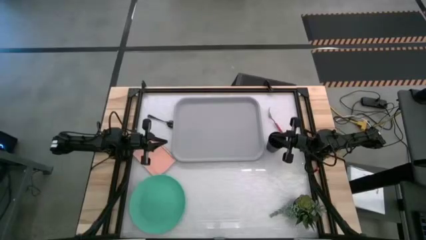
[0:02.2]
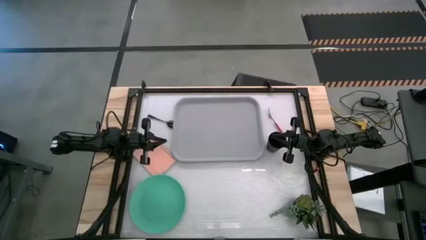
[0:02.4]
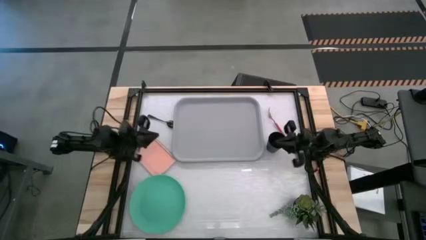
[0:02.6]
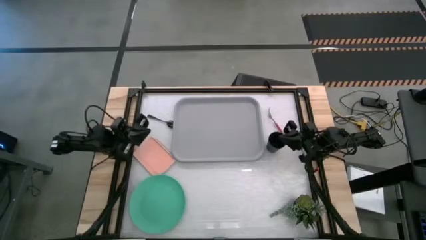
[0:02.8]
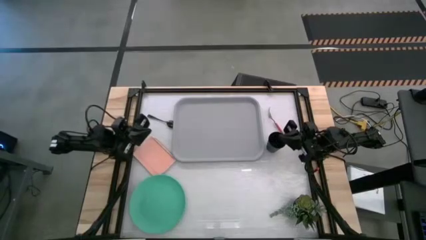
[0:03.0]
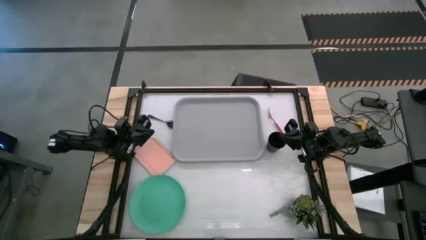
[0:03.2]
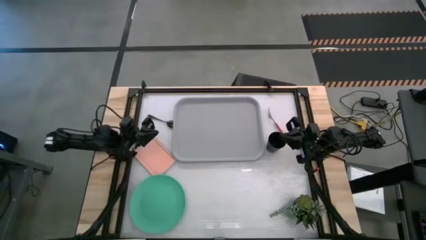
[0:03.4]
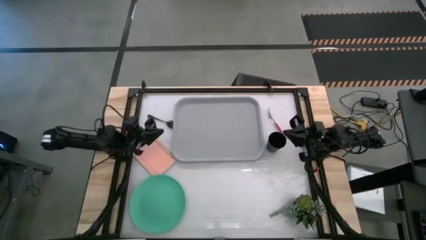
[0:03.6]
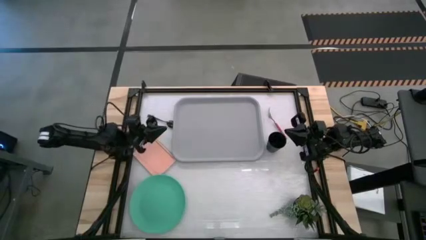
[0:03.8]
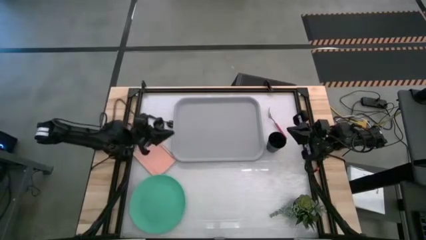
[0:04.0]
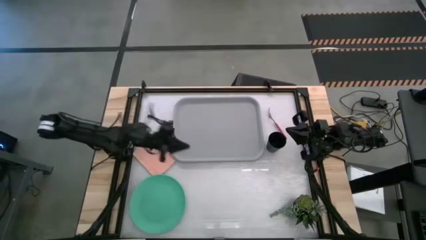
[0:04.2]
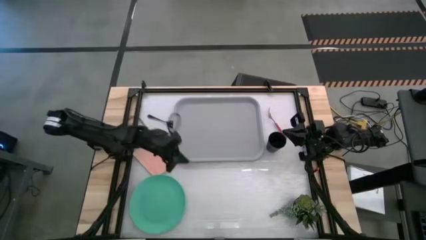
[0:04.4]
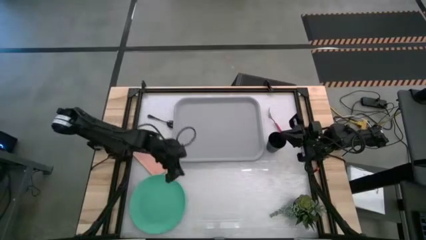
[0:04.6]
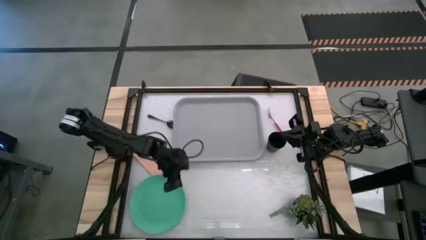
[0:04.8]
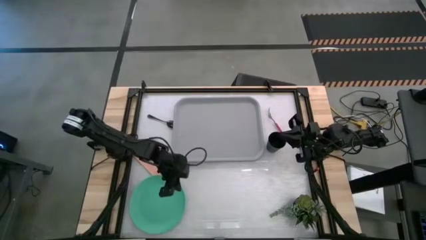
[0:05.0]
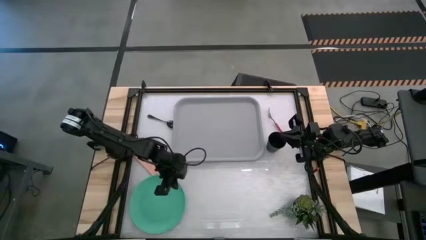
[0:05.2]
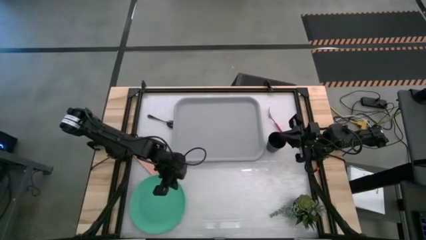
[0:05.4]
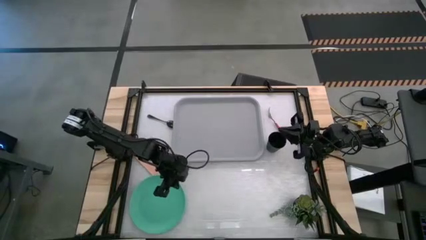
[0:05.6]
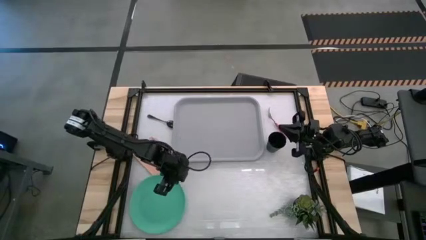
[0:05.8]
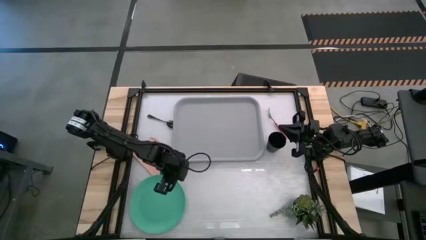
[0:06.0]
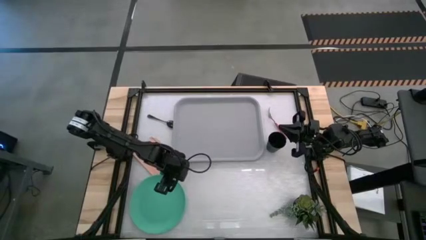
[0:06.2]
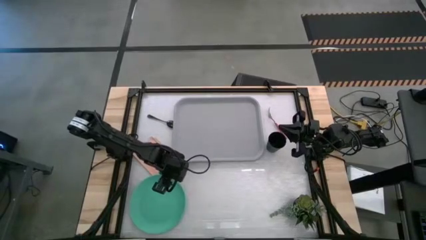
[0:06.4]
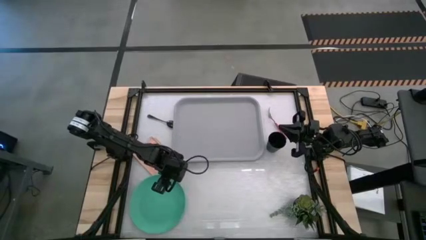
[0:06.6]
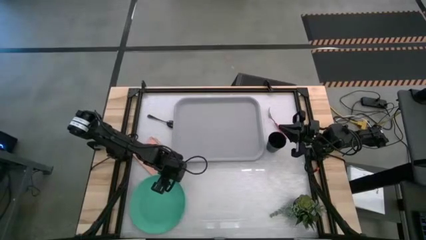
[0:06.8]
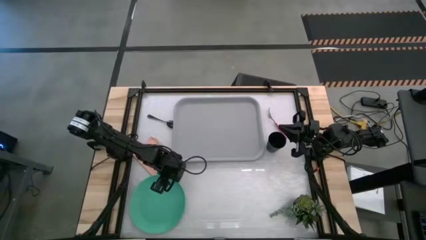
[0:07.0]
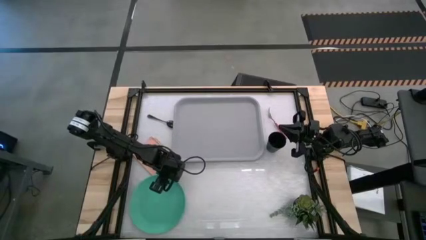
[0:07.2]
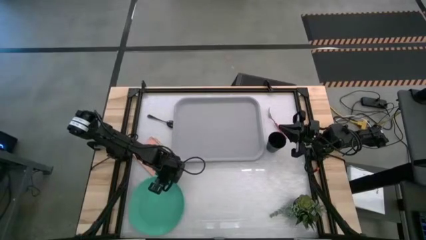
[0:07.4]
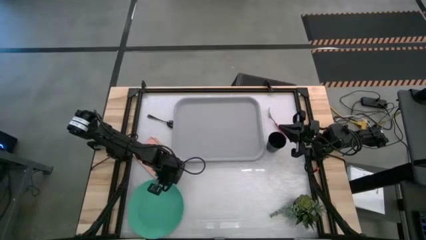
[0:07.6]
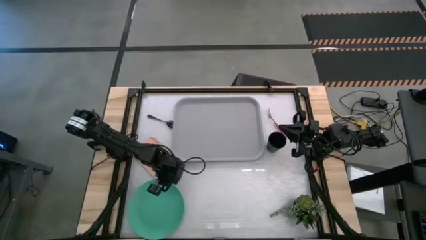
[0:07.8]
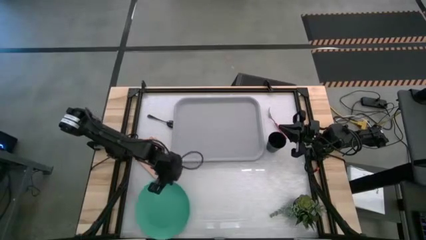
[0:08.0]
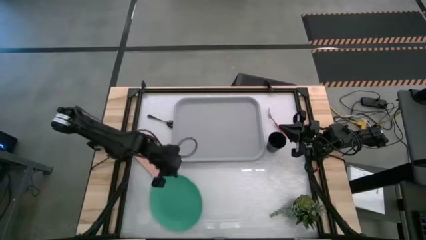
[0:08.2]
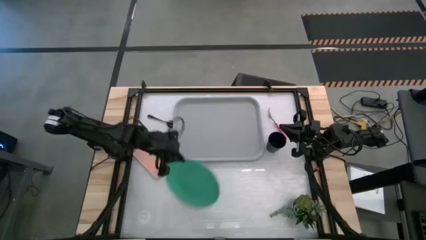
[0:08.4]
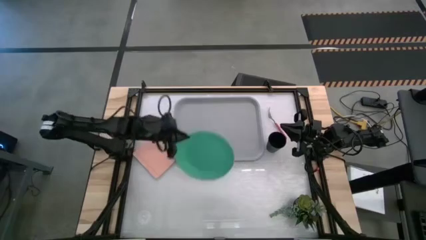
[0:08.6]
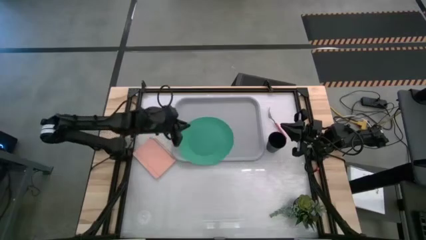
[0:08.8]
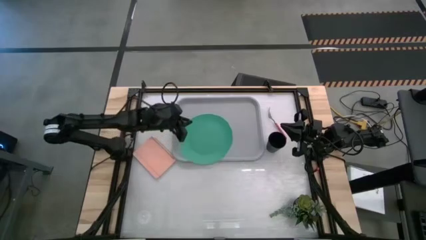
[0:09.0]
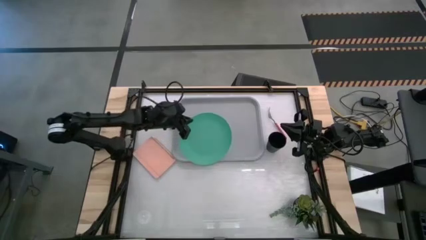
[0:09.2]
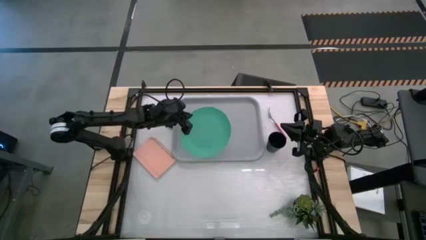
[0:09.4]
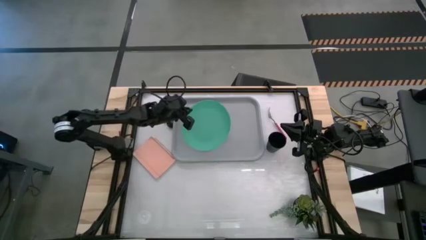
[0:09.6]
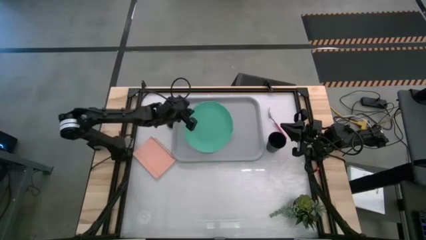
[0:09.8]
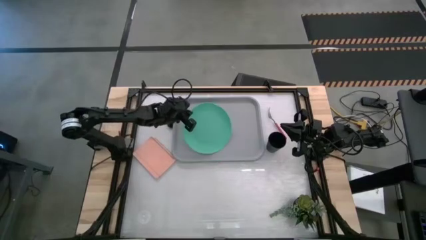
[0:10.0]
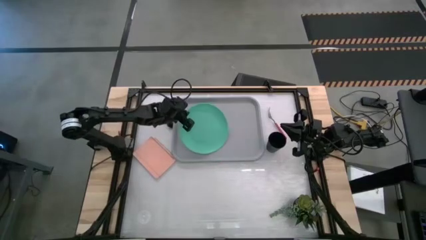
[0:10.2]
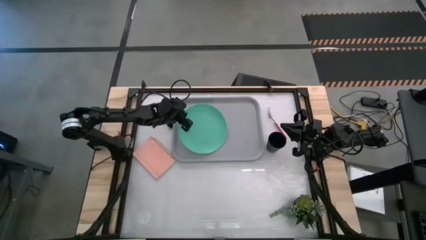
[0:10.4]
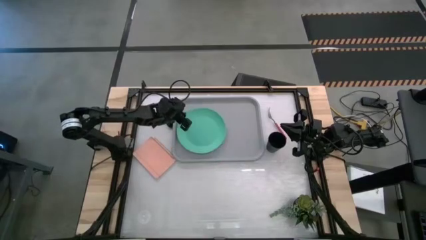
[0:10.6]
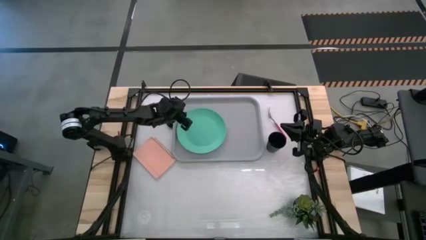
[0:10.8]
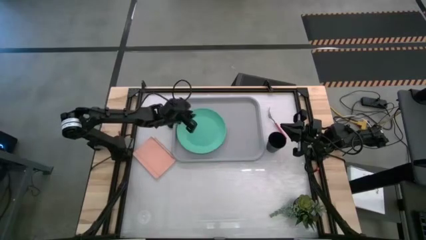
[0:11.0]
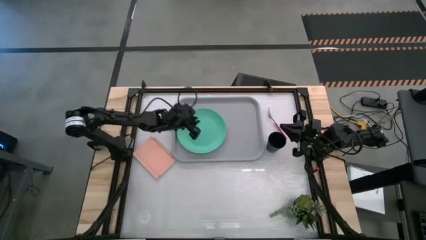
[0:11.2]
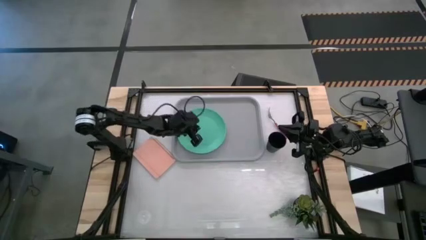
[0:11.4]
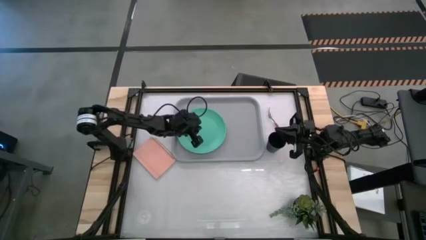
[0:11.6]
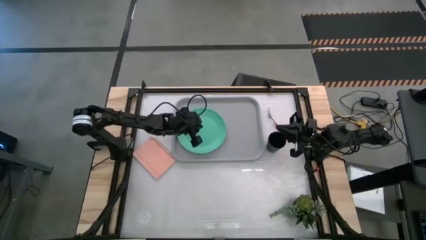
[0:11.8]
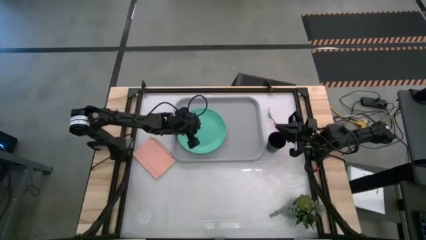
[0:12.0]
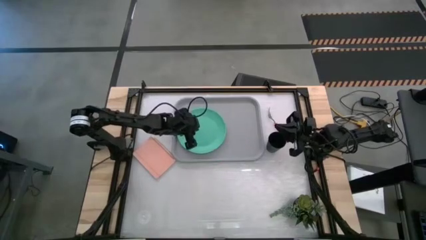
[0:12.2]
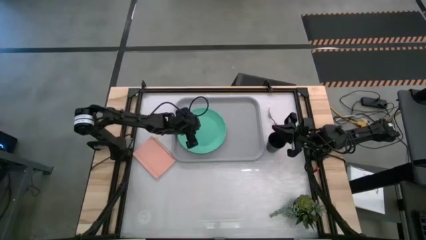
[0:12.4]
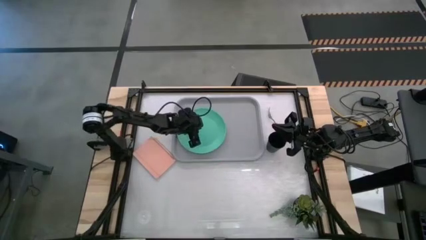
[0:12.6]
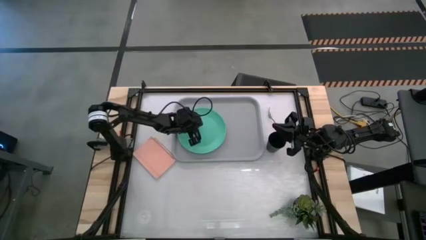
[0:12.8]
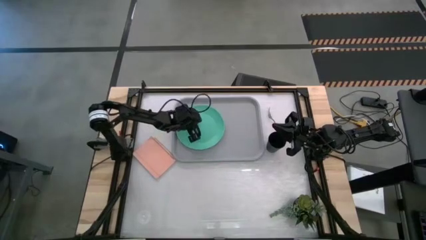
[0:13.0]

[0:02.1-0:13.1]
Task: Pick and place plate/cup/fork/spoon on tray
Put the green plate on the gray serving tray

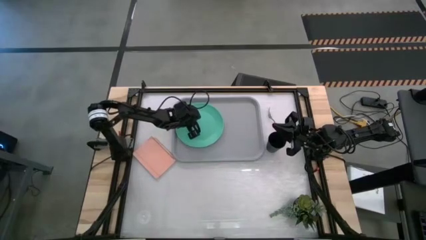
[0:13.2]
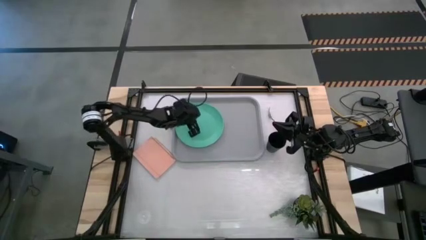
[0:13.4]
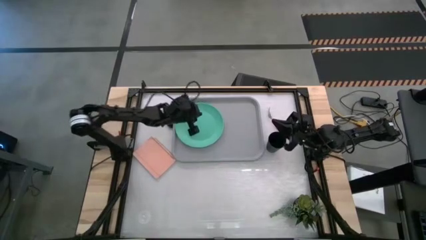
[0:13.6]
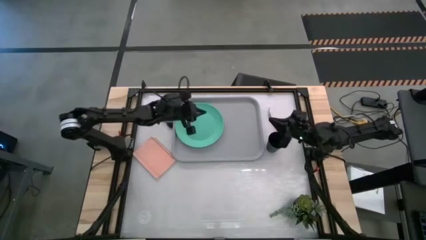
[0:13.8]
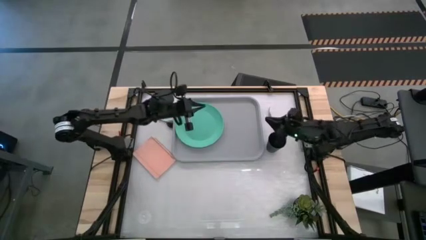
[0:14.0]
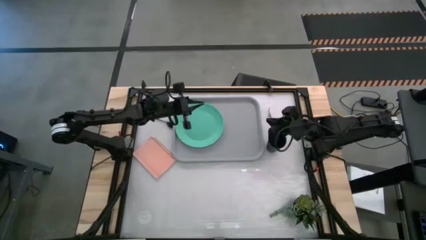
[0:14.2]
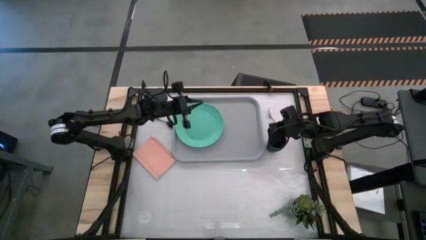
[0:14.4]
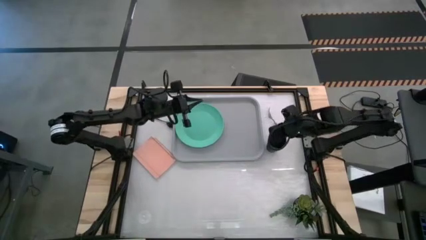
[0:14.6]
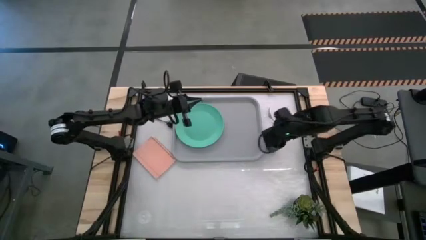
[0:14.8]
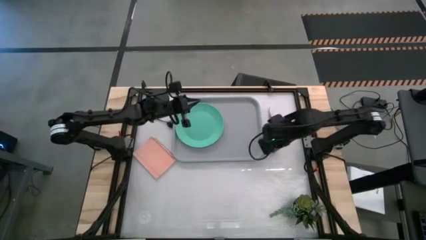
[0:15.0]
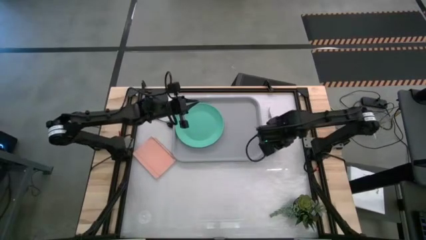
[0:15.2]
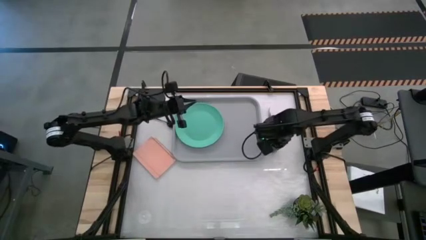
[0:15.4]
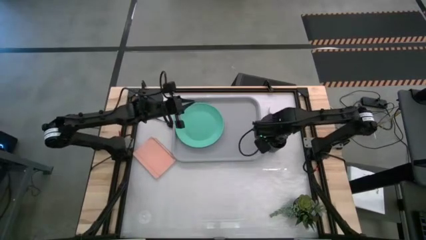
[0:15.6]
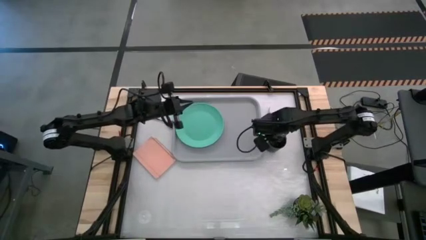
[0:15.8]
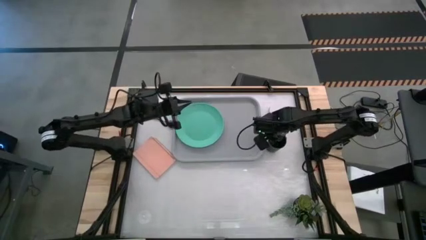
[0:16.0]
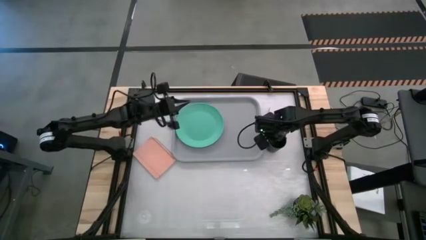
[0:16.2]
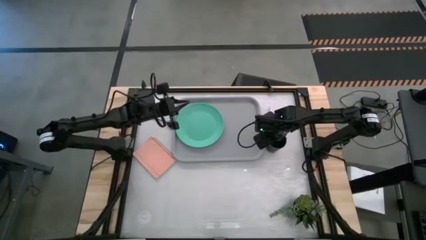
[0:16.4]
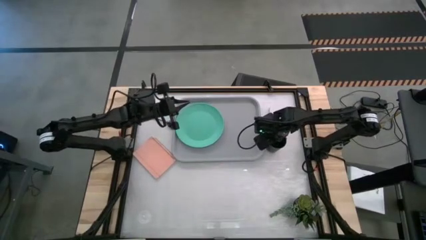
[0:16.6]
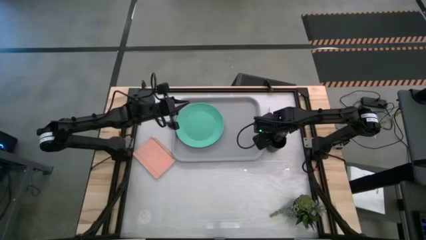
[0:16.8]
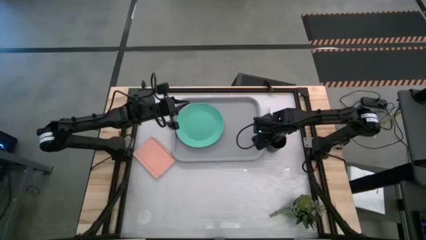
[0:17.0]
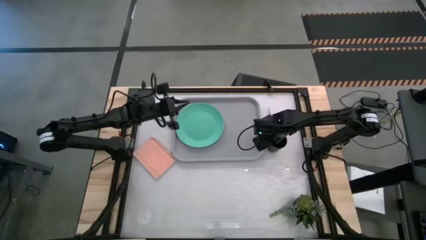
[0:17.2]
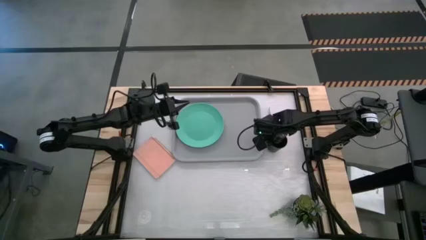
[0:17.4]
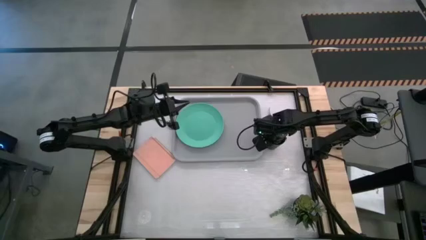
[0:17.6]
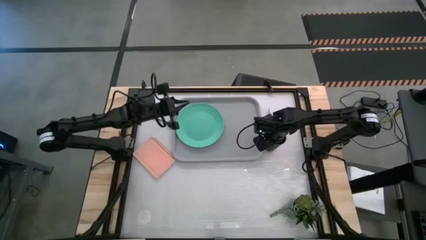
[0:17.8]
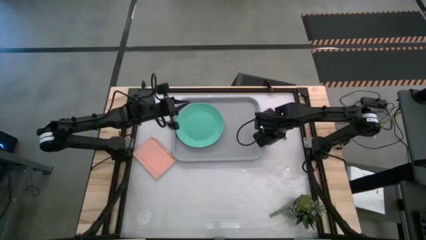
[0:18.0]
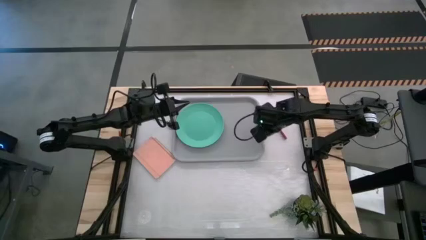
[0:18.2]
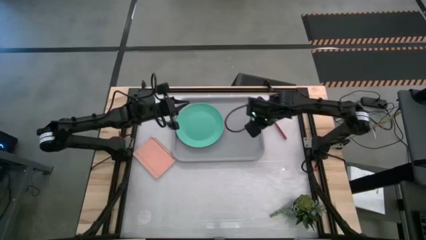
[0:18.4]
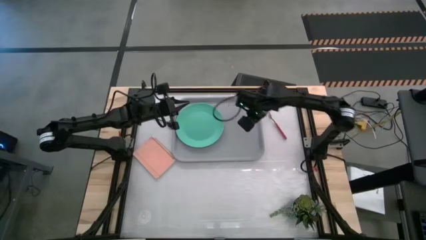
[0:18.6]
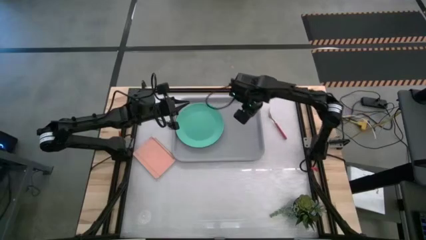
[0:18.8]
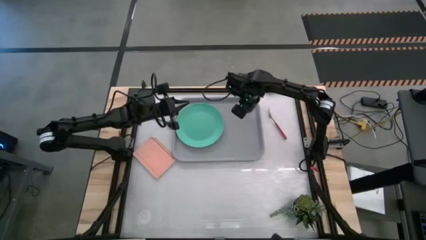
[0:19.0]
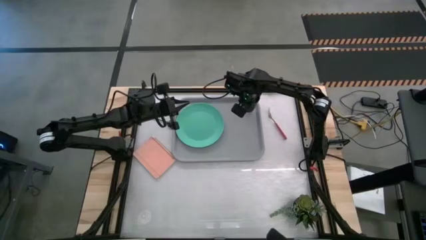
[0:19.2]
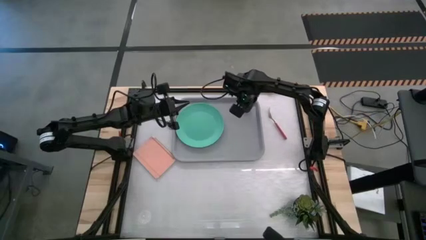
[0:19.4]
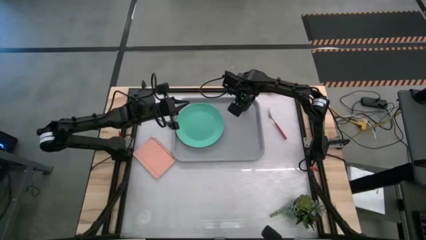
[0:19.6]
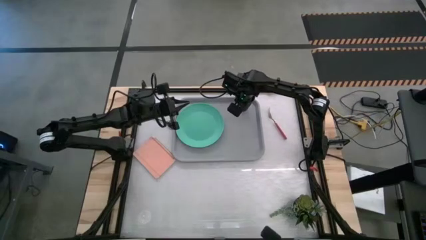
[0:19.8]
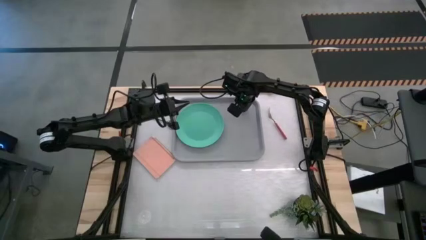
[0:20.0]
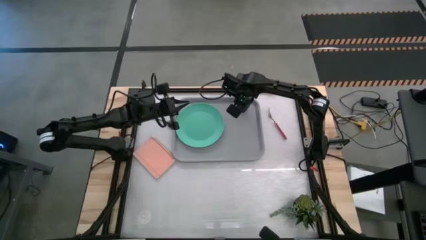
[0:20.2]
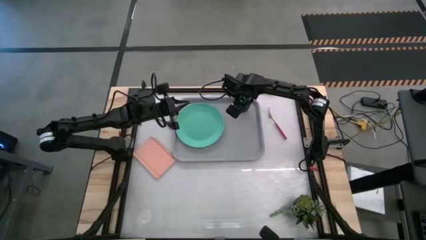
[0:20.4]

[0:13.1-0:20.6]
Put the black cup on the gray serving tray to the top right of the green plate

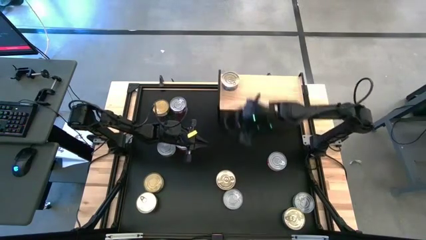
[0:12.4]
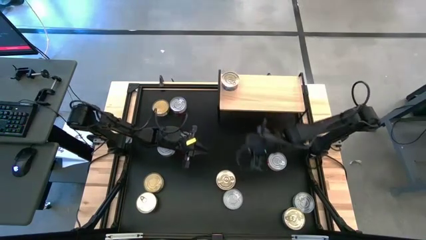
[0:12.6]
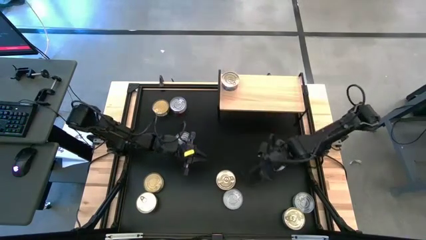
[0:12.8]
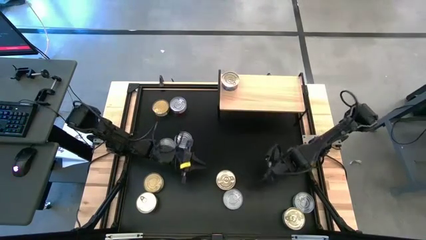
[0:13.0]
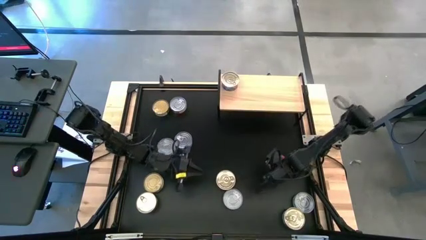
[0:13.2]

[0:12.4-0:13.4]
Task: Stack canned seafood by type on shelf
Put the red tuna can on the shelf
